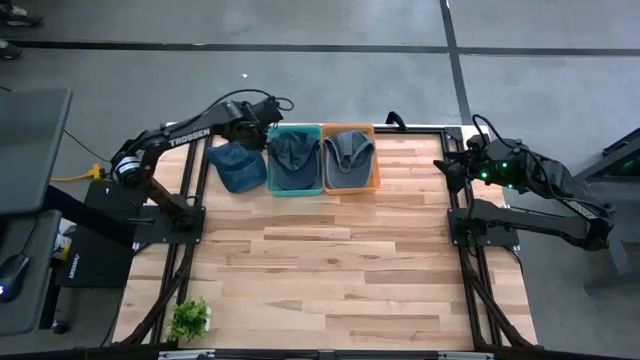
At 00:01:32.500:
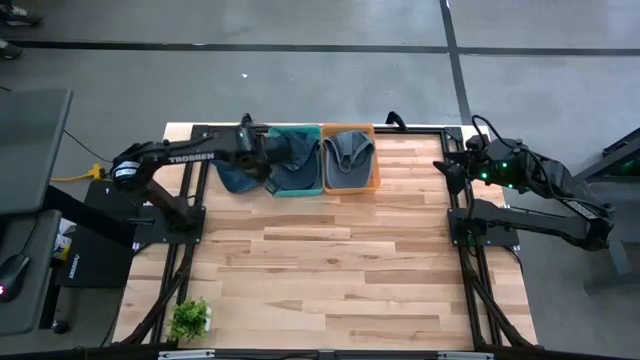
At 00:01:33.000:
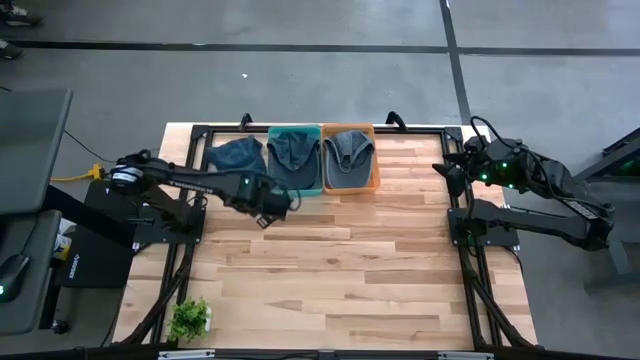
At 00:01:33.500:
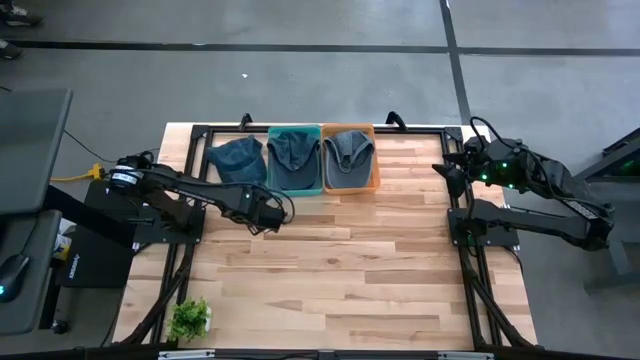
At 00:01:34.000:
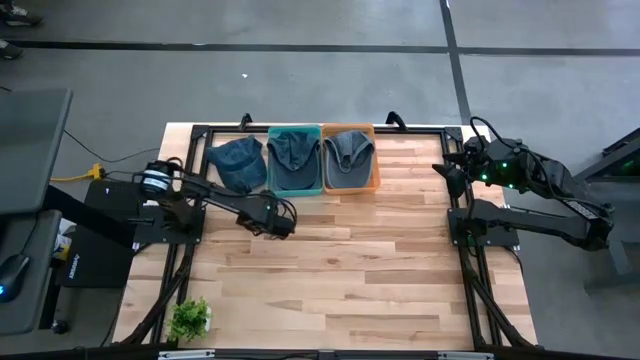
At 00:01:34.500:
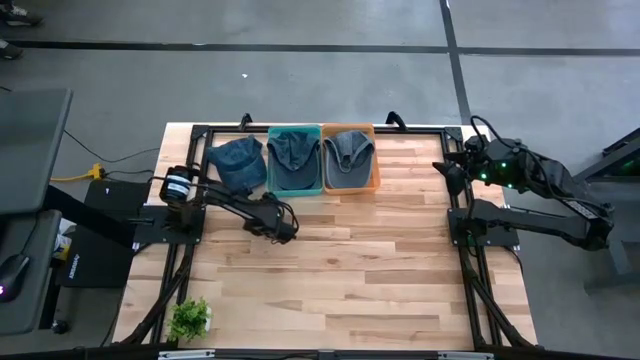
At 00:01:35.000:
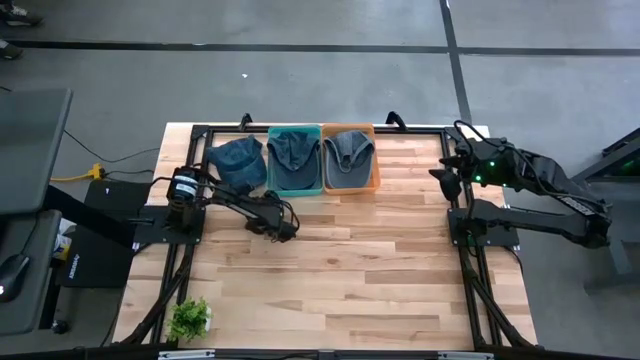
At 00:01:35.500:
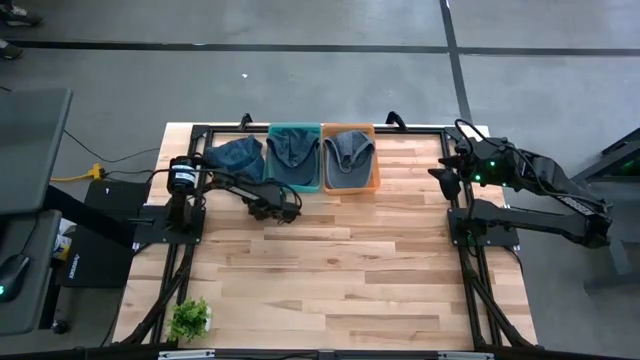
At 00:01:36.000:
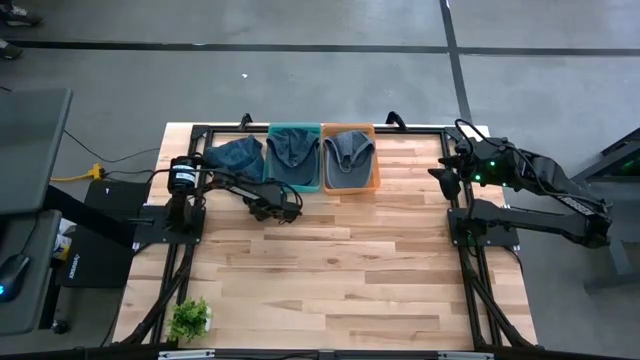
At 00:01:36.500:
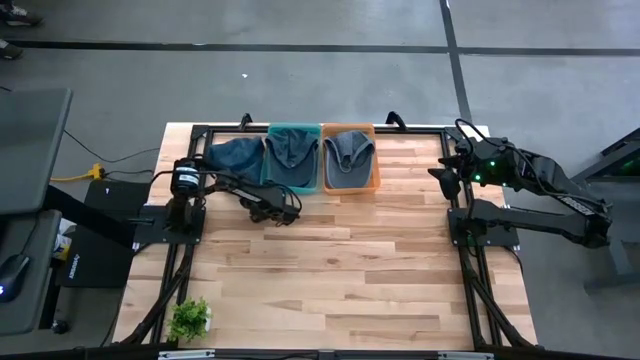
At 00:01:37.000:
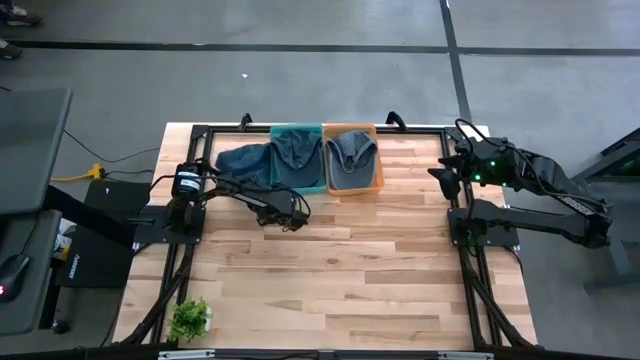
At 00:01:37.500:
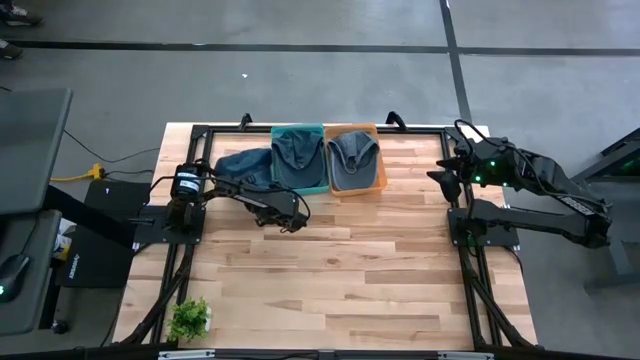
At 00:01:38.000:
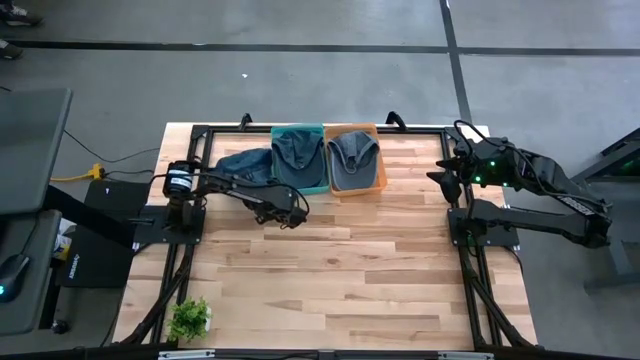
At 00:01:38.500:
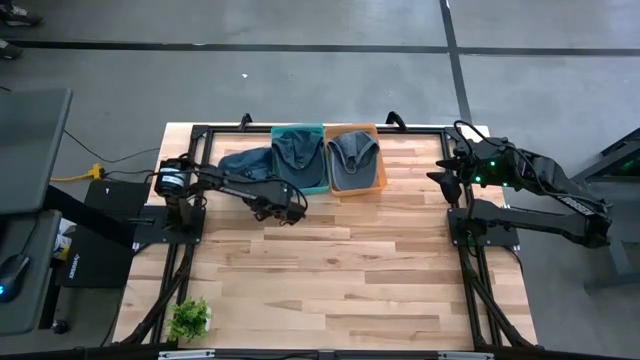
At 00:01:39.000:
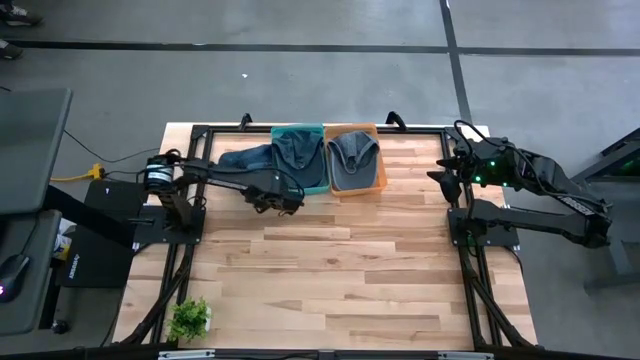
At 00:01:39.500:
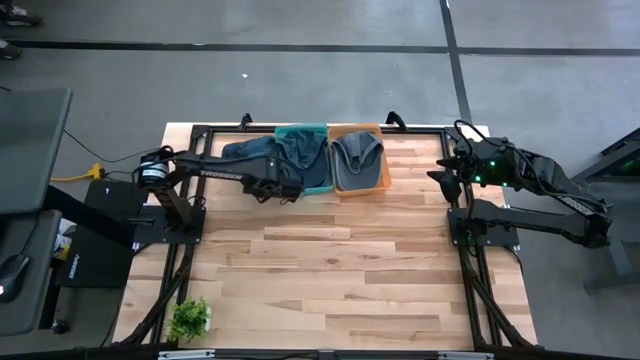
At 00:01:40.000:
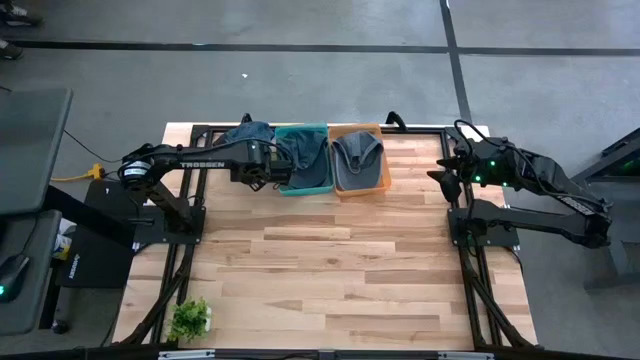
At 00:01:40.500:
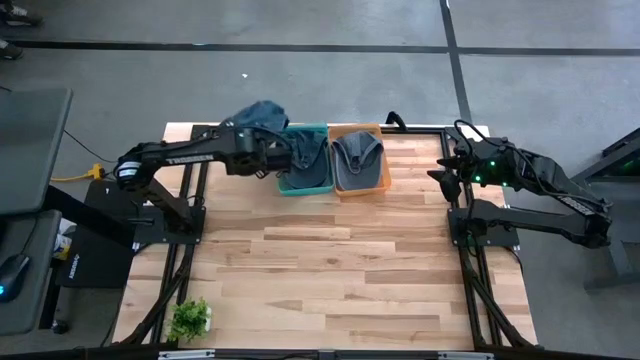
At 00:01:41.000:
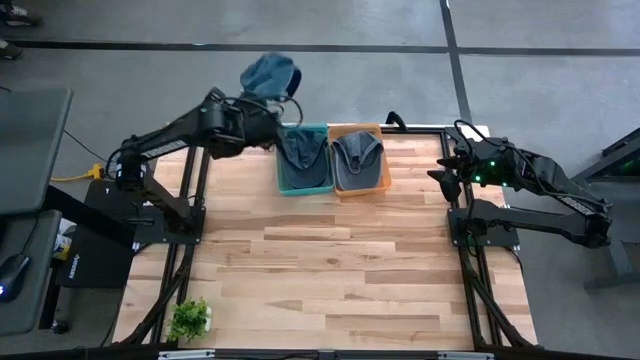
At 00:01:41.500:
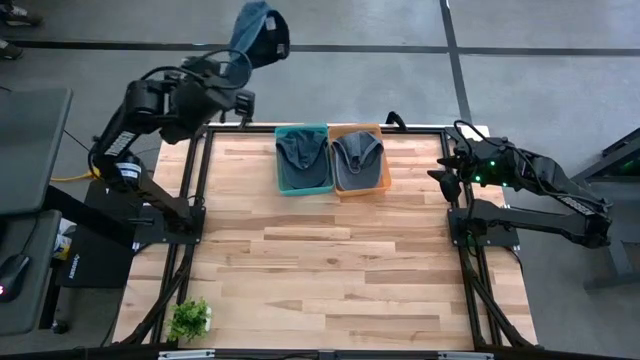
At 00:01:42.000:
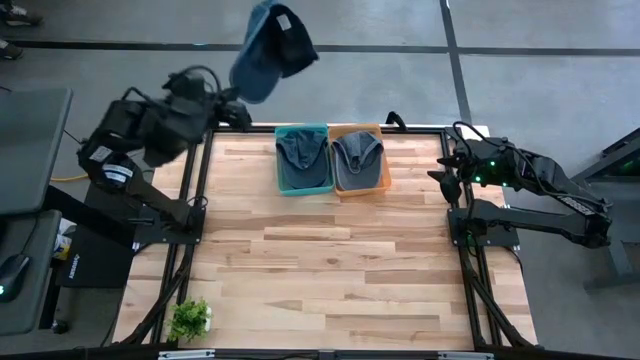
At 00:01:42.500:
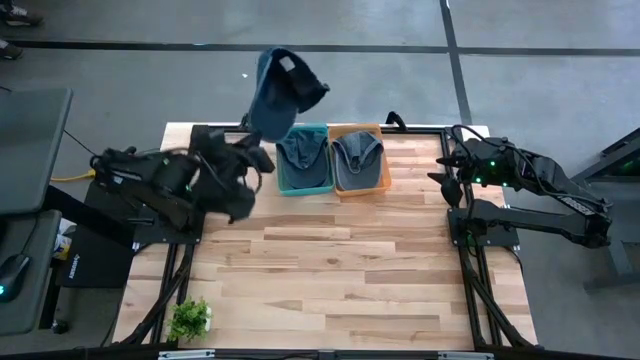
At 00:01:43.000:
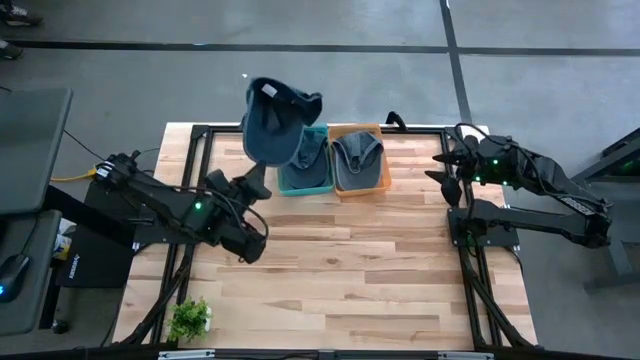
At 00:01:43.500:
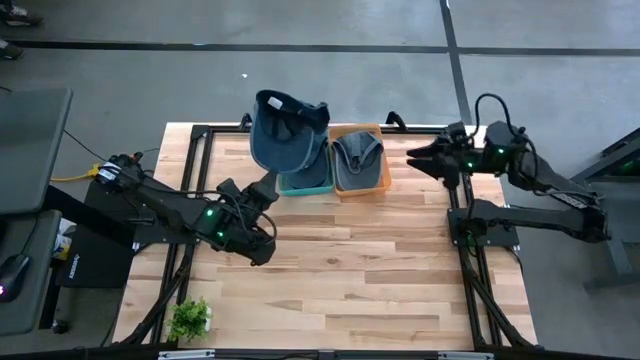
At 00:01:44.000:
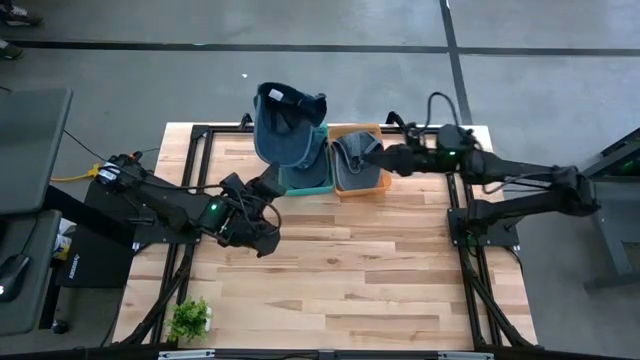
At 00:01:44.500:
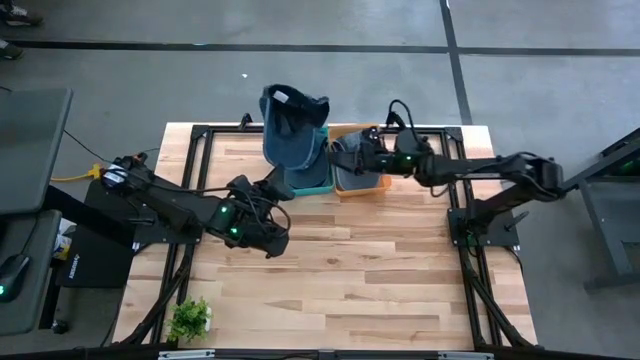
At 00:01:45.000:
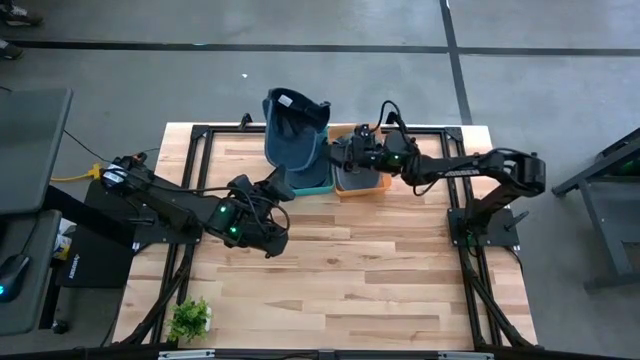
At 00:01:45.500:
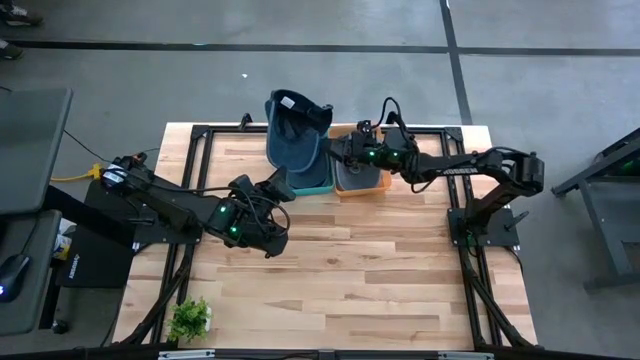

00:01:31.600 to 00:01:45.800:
Task: Pick & Place hat
Put the blue cap into the green bin
